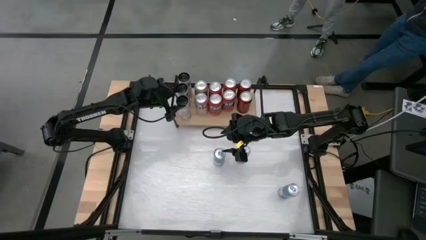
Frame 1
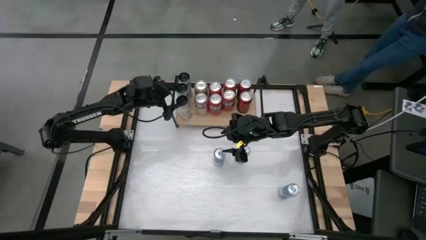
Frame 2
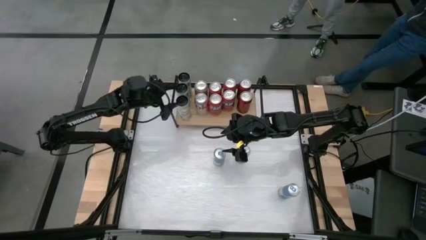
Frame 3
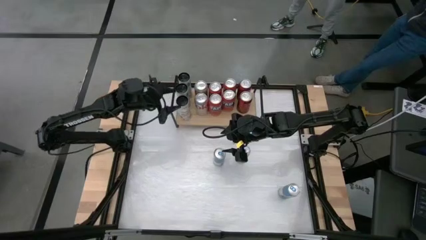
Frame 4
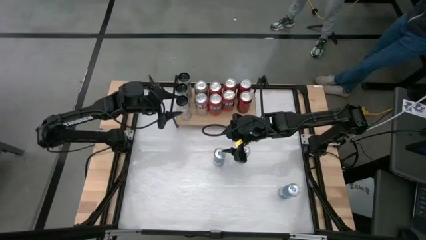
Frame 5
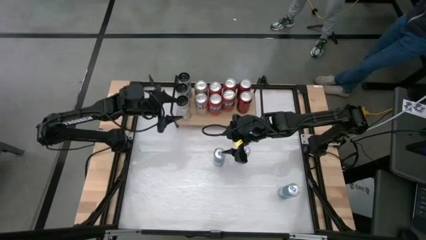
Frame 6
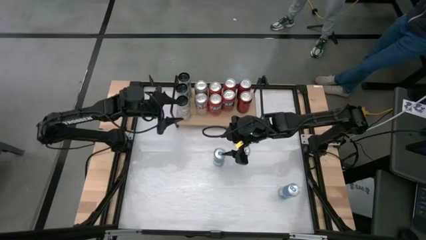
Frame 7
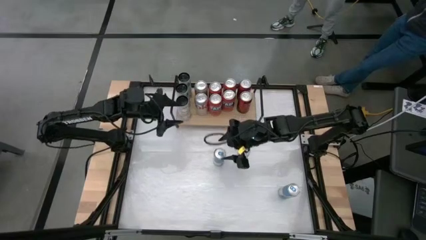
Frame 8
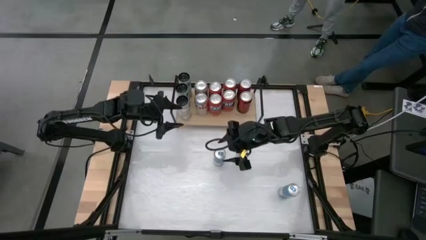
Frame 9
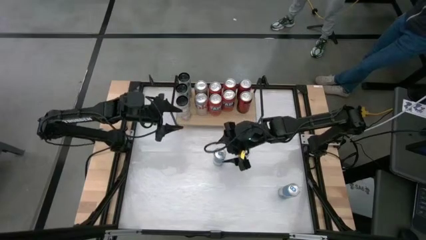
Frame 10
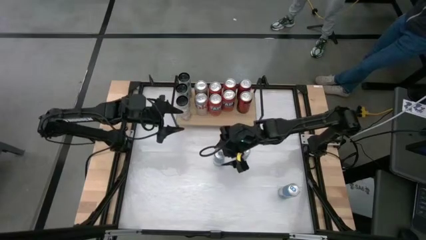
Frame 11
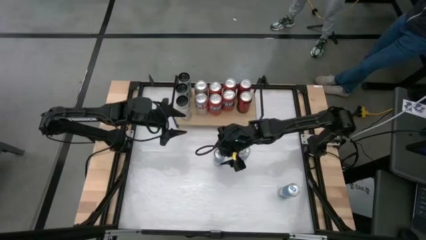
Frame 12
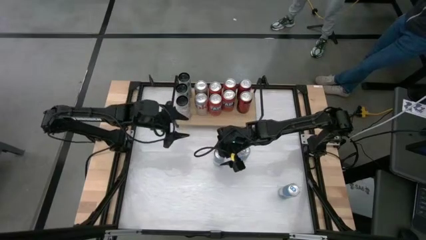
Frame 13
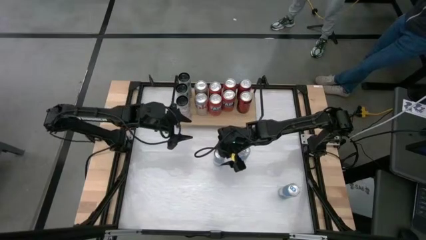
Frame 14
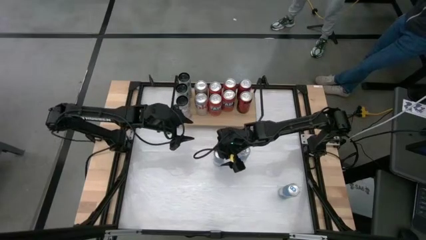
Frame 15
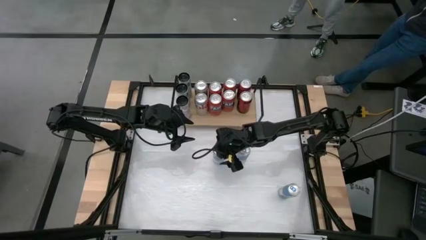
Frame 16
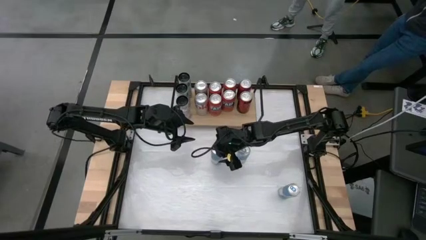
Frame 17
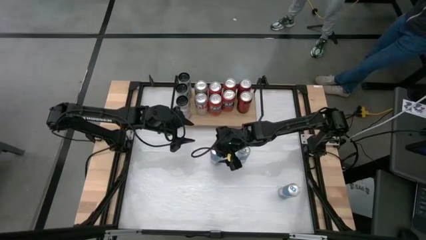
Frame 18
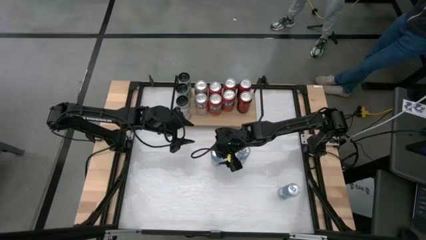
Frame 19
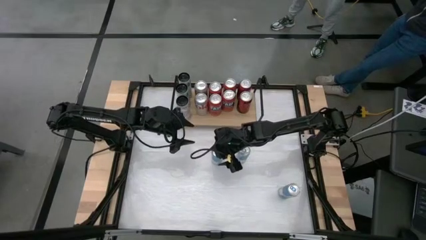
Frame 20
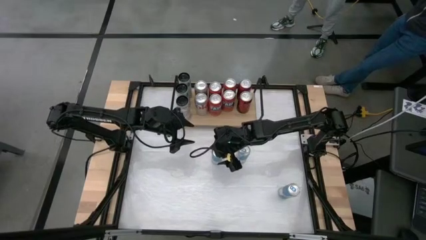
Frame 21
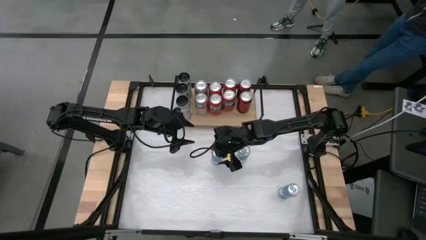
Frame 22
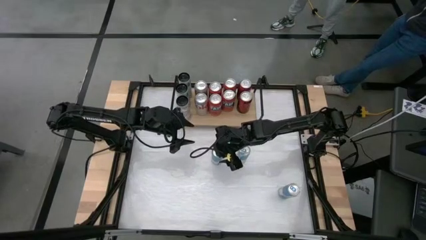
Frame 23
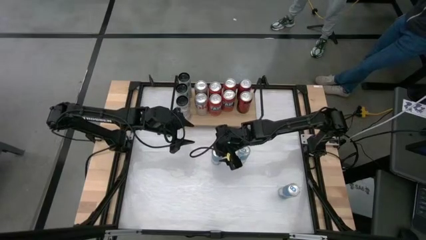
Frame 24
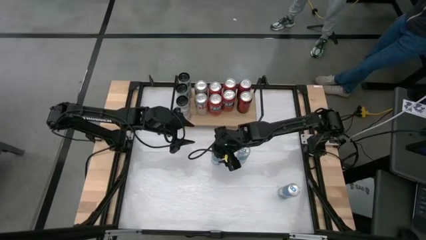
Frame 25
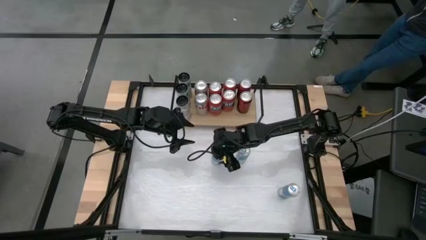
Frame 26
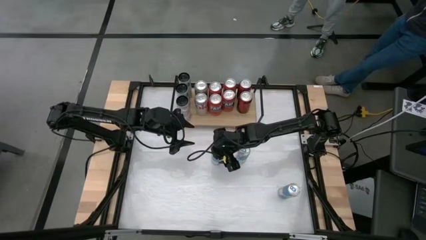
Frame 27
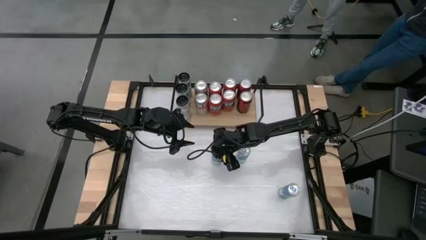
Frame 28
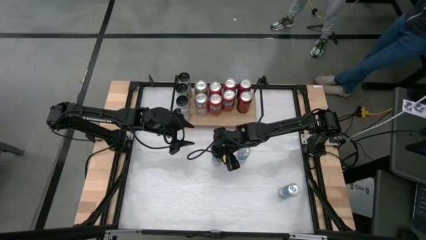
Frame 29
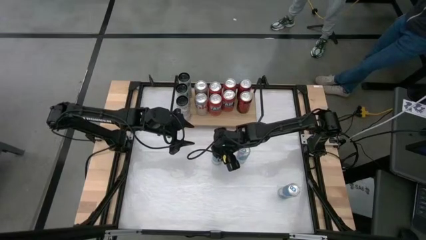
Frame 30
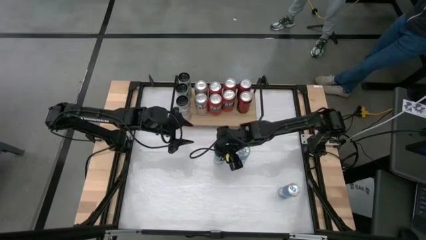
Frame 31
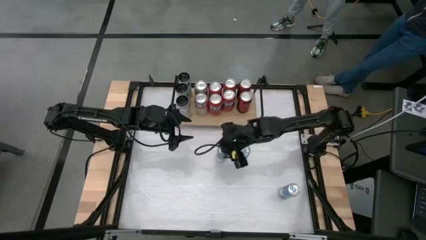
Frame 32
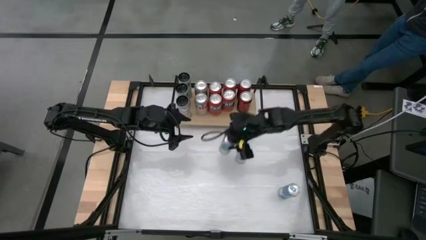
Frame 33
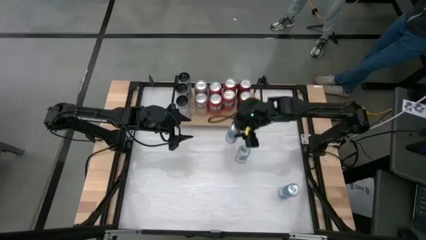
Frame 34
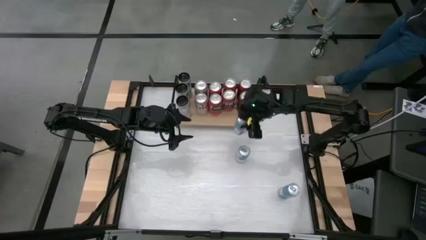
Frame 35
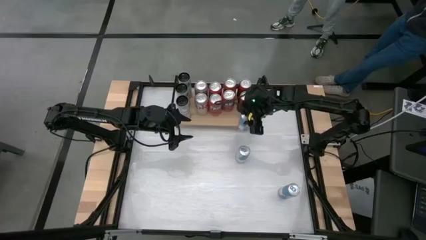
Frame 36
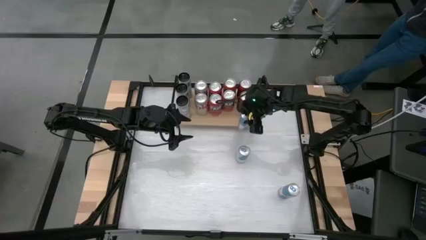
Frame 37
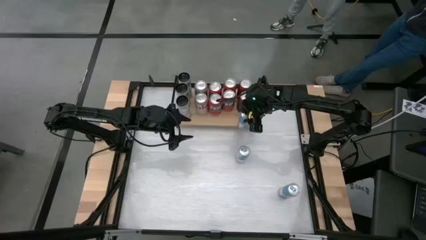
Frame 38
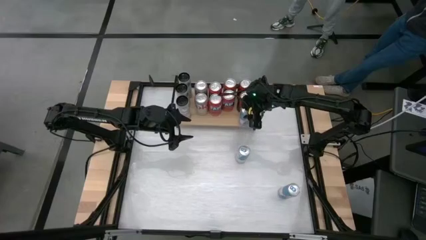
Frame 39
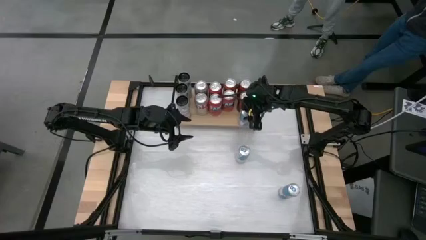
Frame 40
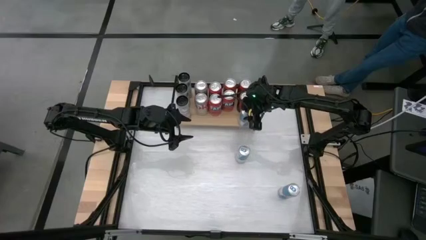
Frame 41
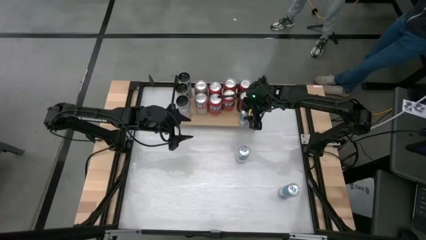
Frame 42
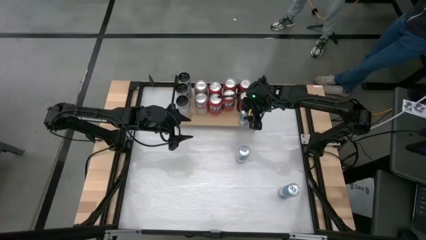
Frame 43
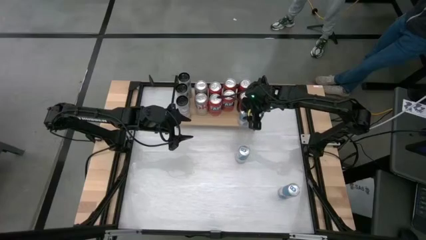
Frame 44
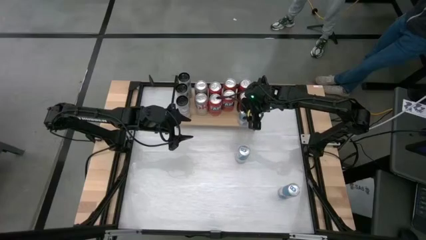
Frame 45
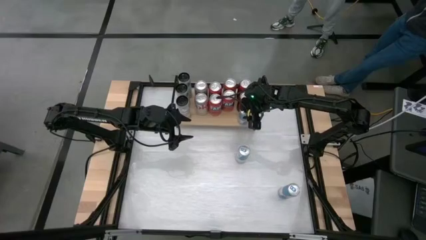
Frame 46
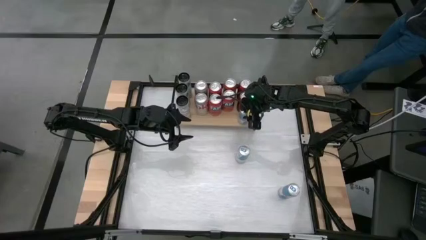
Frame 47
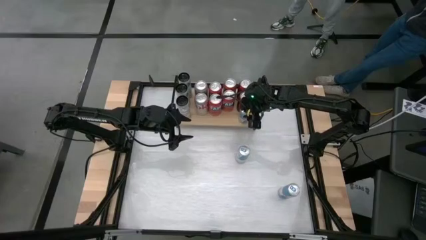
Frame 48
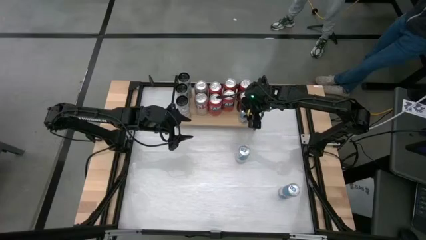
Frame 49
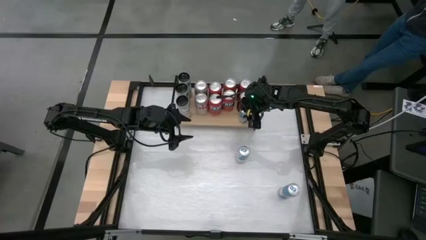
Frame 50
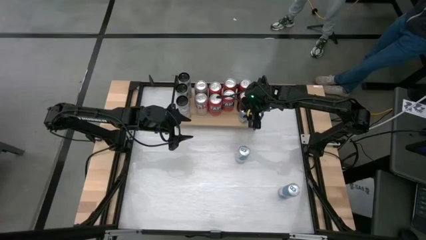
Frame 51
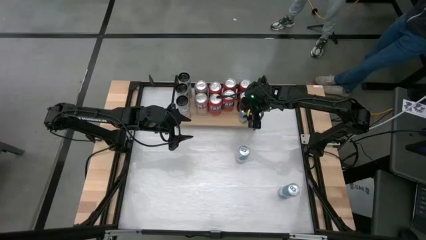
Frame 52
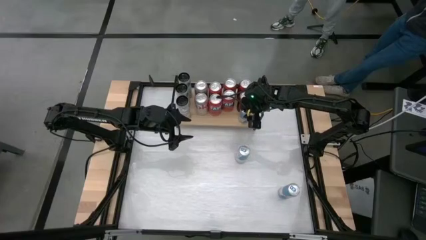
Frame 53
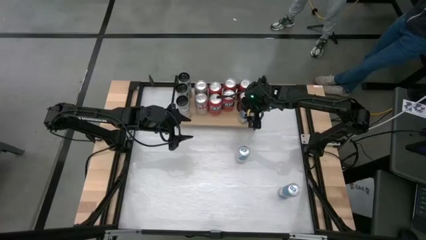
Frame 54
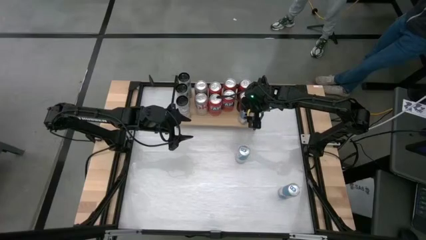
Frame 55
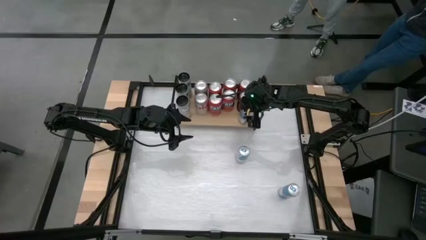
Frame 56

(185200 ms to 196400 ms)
Task: Place canned beverage on shelf
Put the white and blue soda can on the shelf aligned with other red soda can
